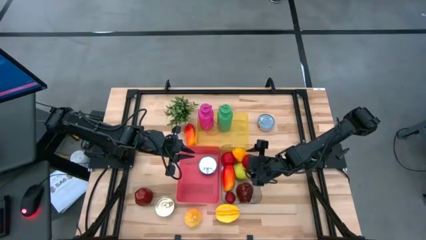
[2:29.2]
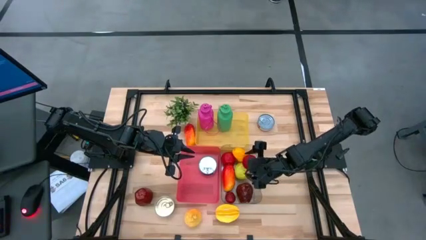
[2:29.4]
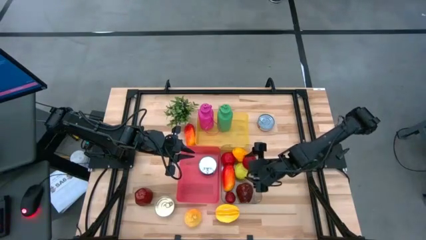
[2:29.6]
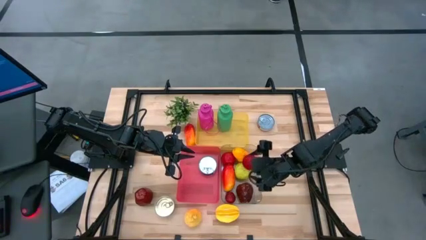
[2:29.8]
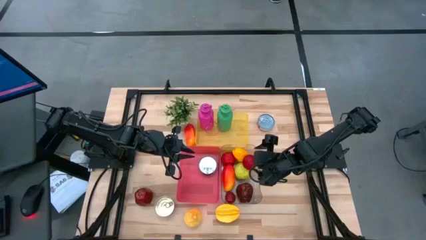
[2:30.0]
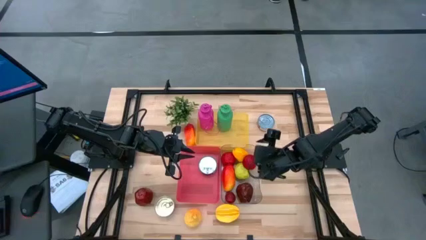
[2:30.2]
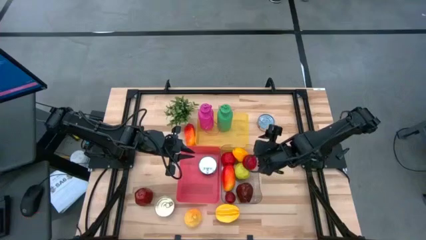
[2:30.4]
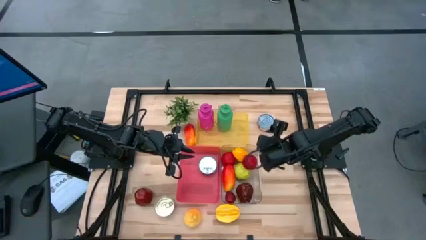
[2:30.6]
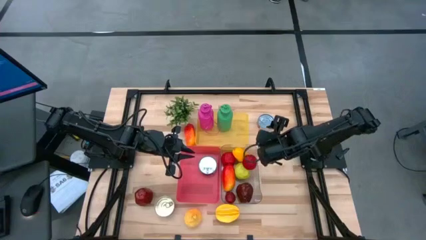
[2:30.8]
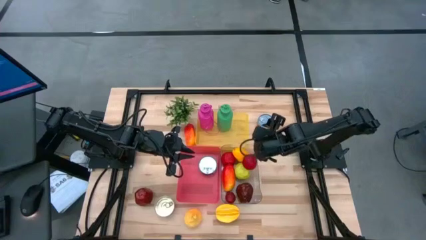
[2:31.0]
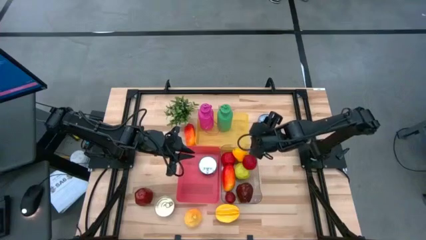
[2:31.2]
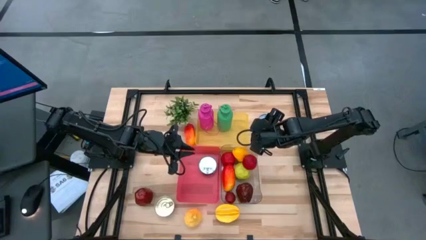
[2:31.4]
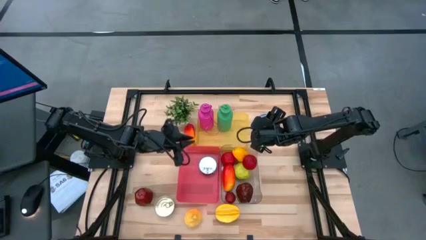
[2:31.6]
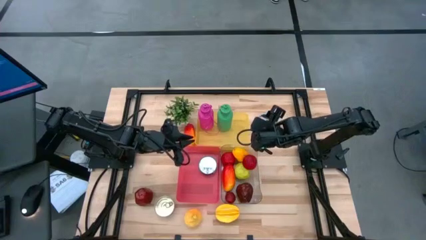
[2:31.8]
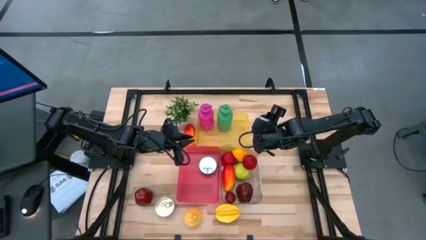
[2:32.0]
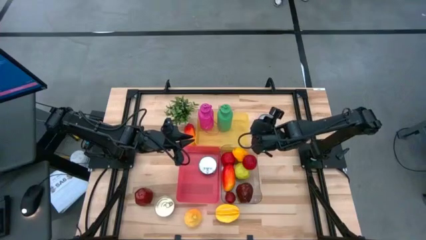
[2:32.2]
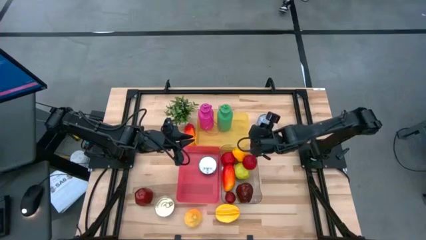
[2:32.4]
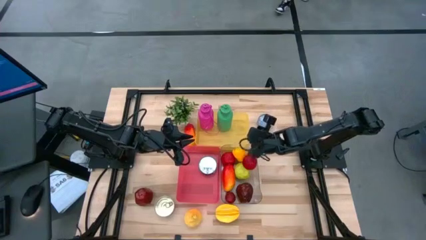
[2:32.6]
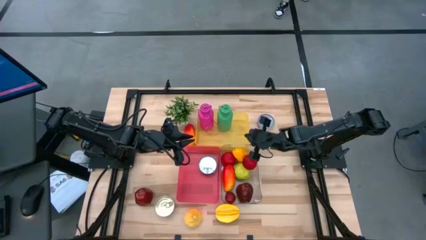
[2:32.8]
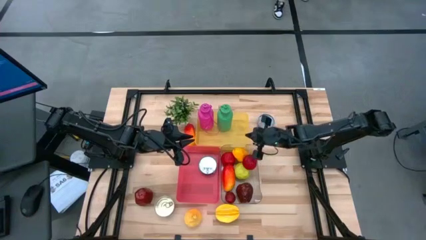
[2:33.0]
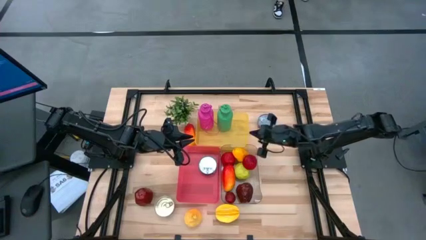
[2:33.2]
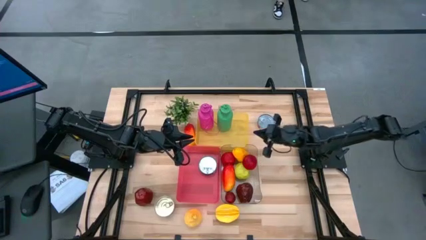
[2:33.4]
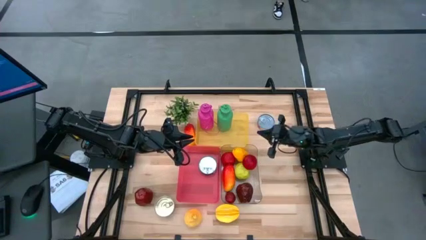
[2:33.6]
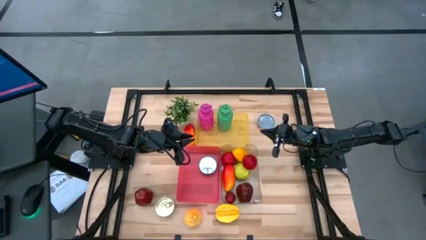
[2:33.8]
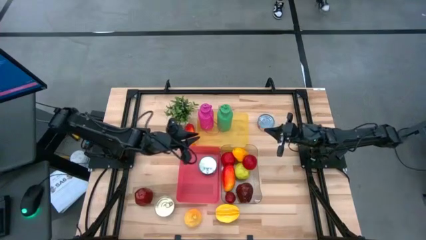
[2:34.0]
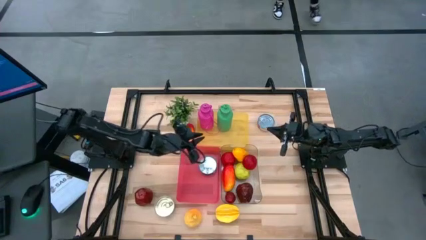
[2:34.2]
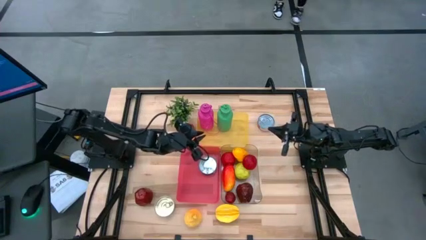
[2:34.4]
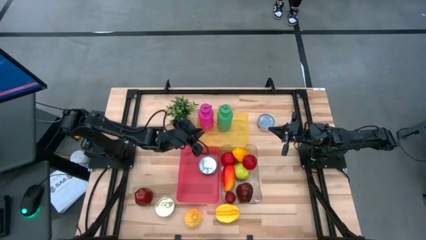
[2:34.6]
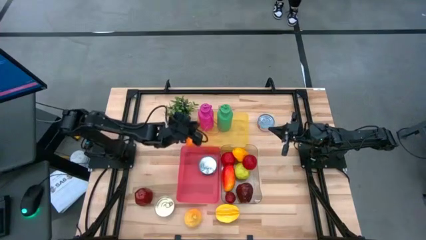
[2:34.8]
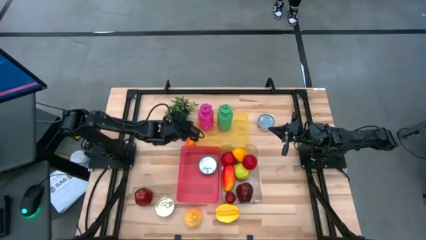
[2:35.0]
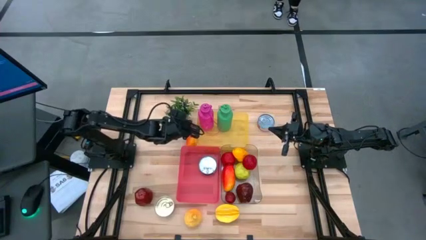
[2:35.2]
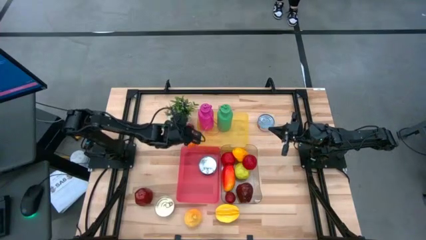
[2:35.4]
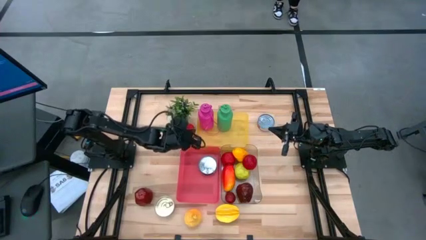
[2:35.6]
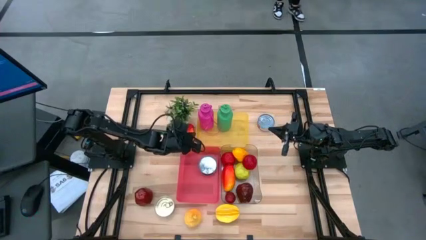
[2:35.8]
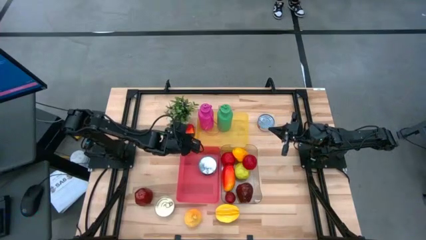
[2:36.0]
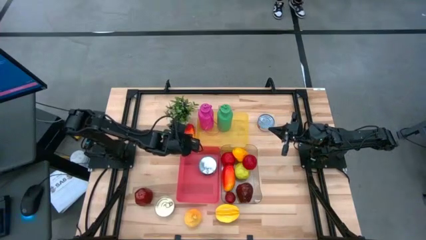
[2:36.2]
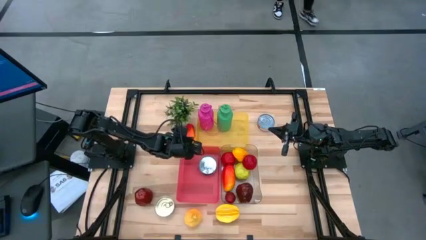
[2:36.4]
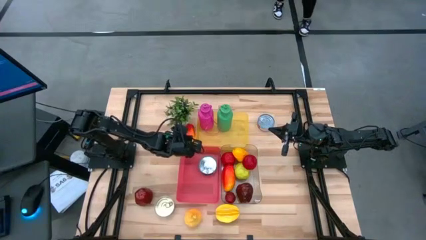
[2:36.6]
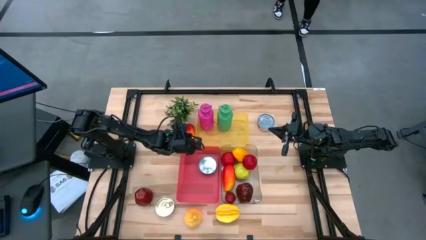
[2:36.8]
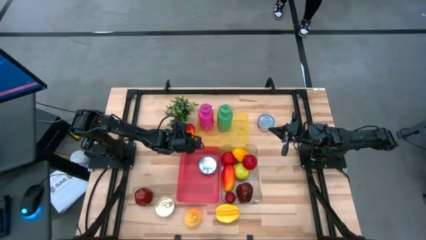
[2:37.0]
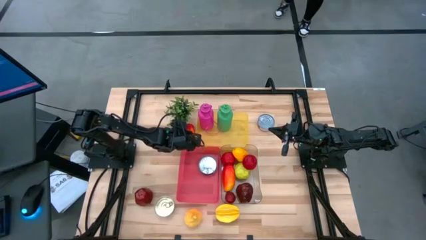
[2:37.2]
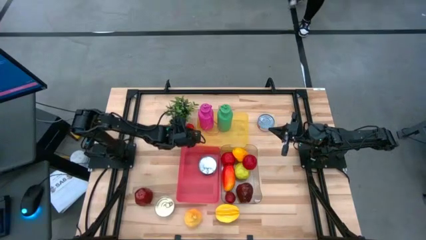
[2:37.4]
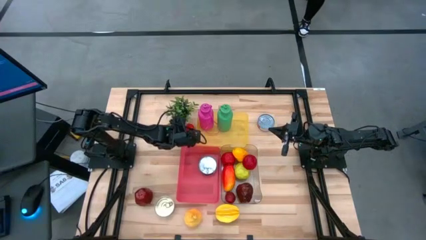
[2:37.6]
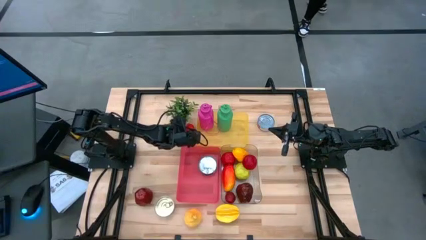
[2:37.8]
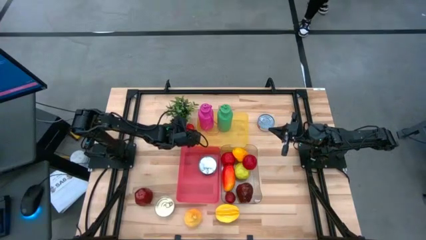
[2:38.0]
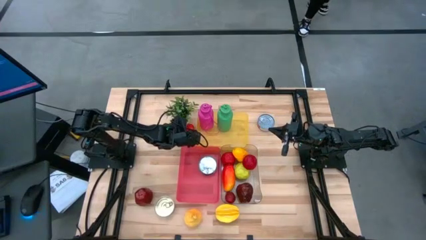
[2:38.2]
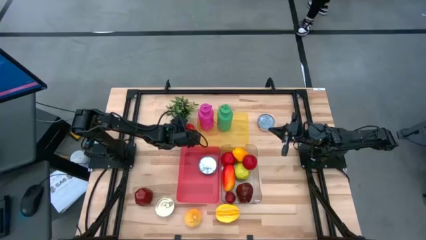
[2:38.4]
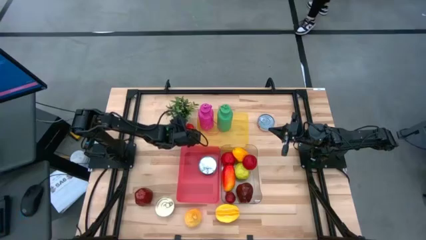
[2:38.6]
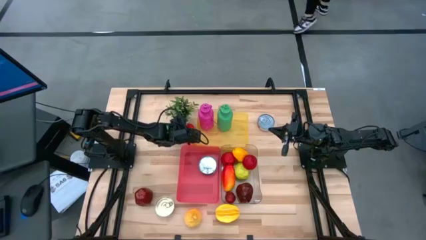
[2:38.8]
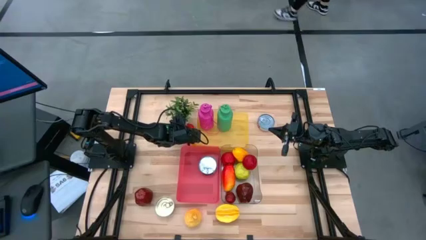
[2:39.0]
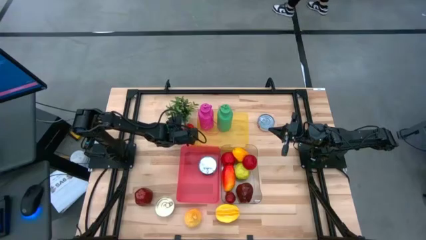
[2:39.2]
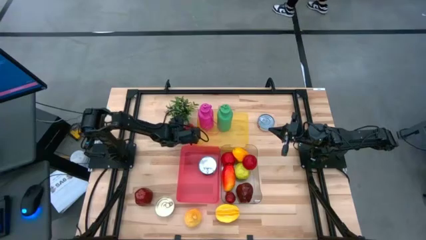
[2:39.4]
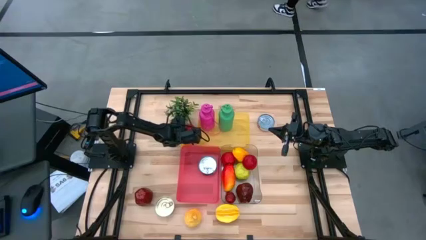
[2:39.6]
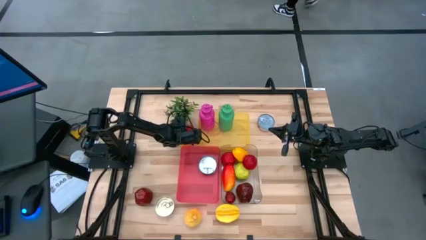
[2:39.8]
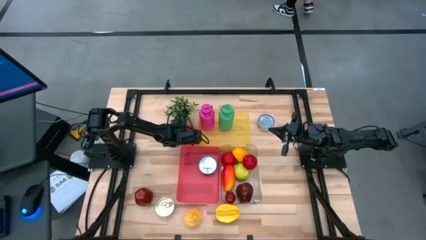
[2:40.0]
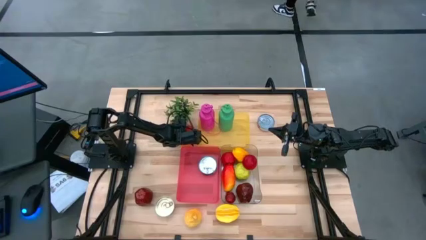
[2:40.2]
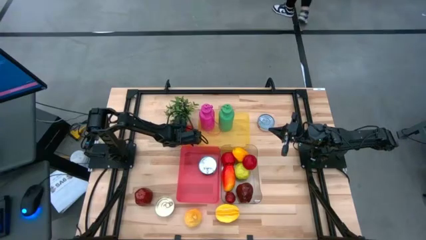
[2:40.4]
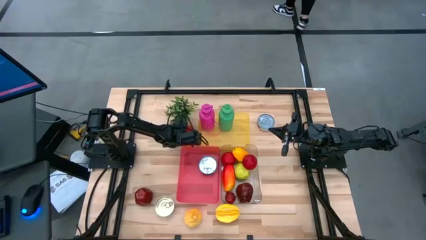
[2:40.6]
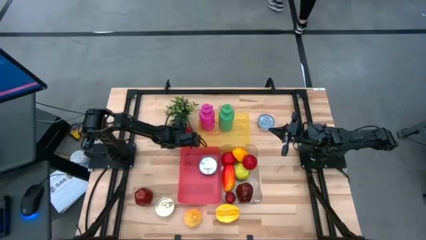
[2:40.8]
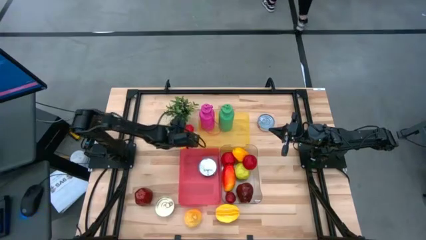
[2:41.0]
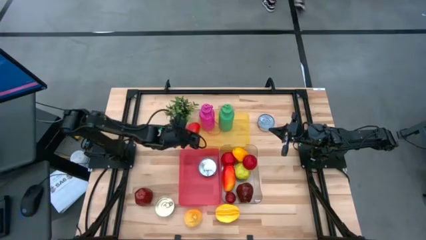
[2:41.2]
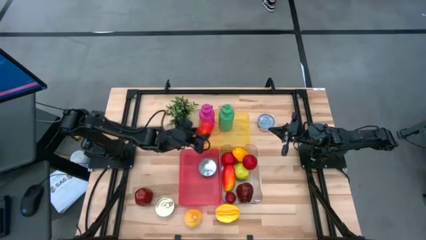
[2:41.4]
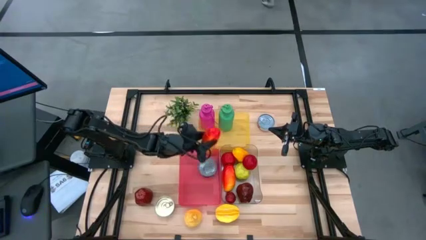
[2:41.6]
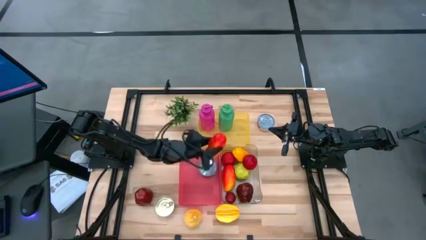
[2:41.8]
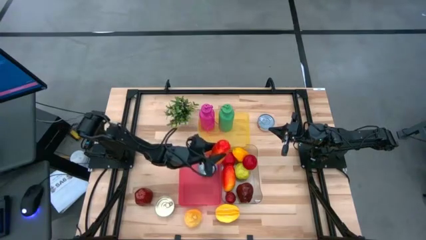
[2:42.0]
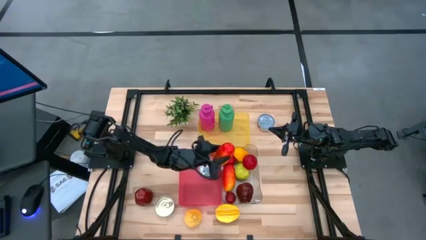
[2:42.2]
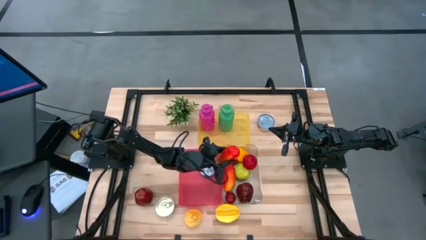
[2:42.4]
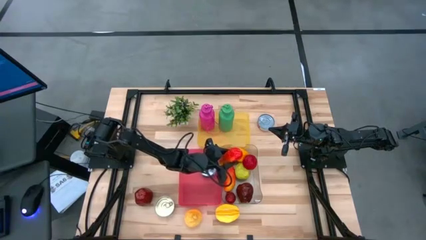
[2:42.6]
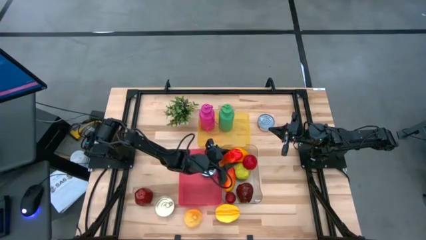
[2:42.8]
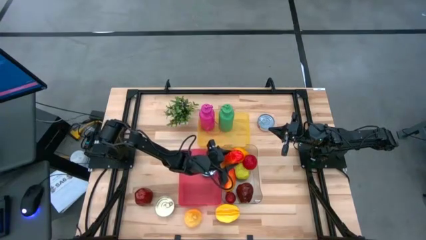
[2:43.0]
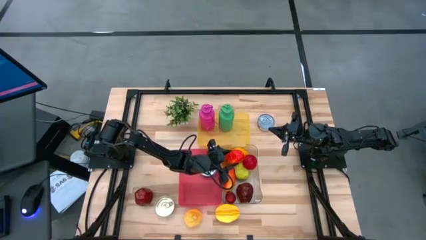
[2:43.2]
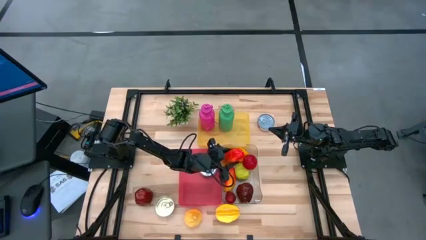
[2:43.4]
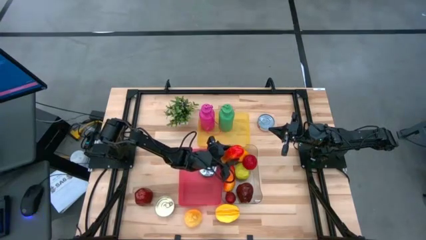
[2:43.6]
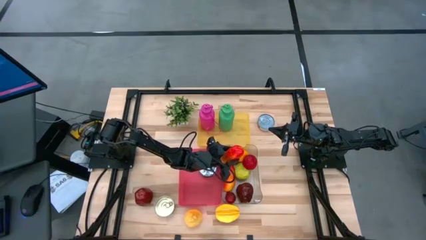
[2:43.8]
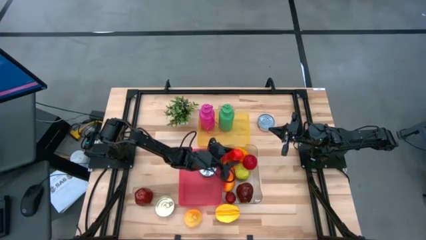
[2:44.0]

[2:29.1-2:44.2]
Task: Pick & Place Food Item
Put the mango into the transparent bin
